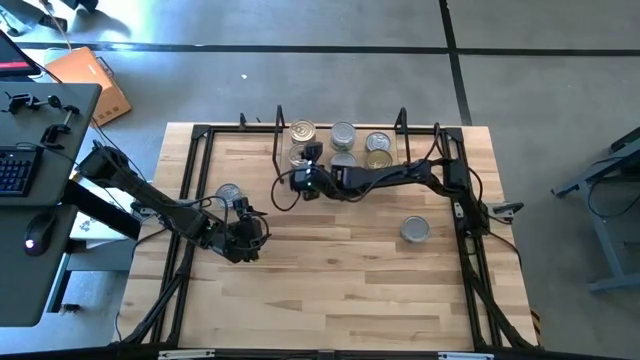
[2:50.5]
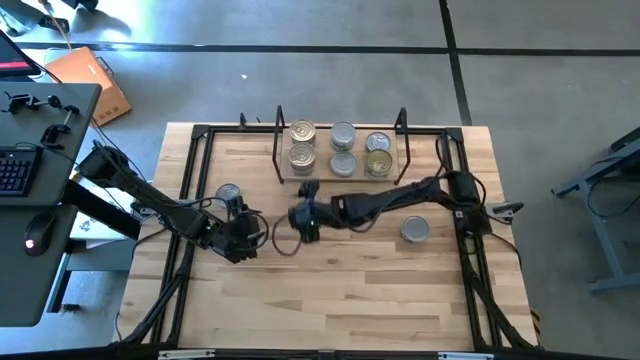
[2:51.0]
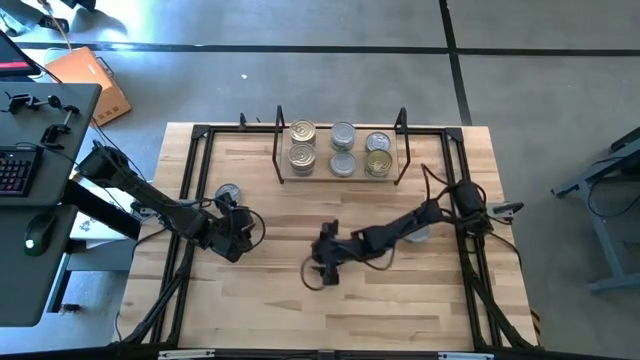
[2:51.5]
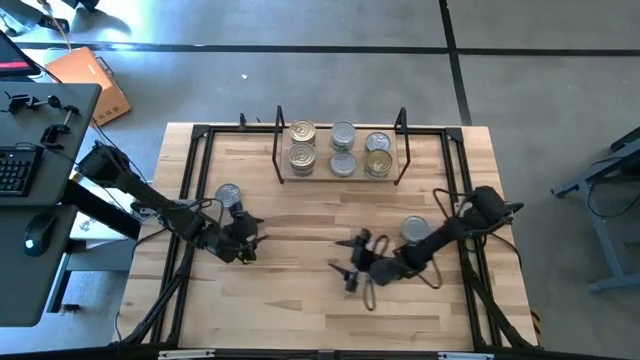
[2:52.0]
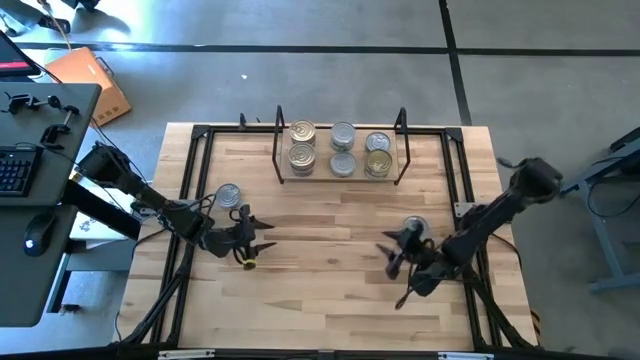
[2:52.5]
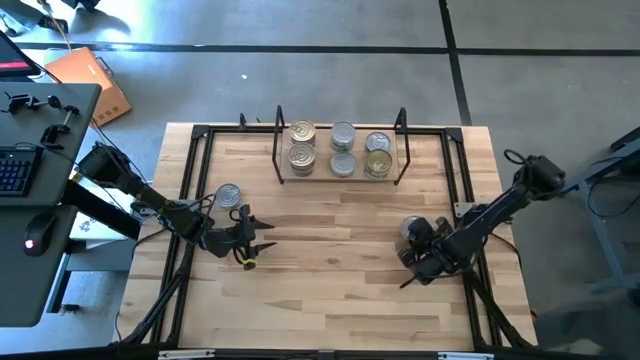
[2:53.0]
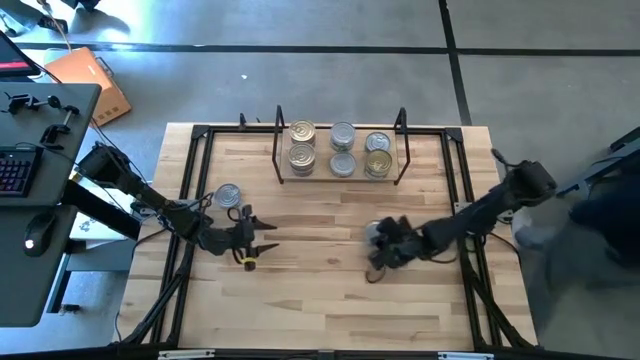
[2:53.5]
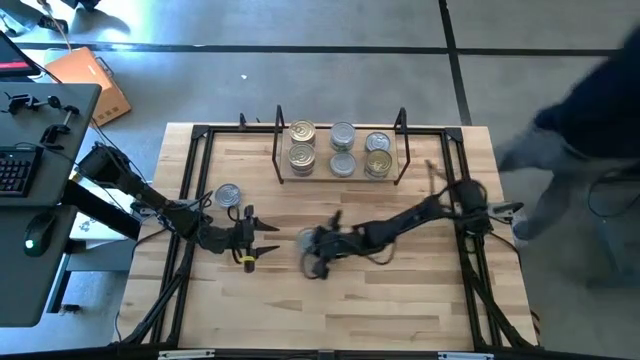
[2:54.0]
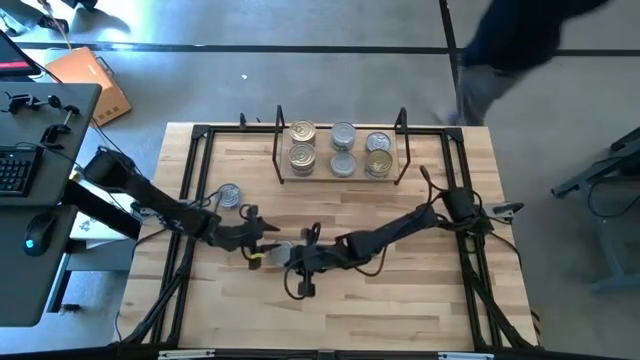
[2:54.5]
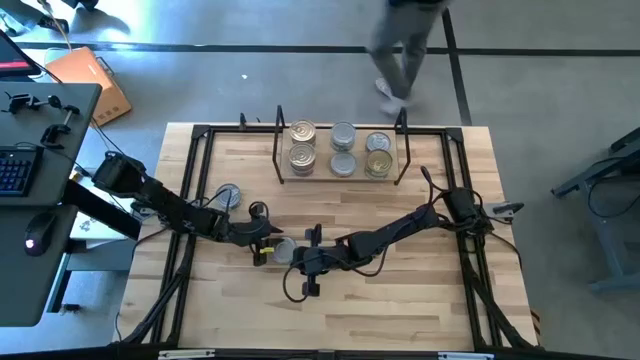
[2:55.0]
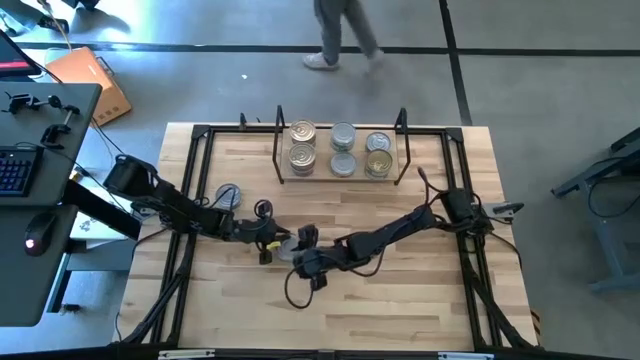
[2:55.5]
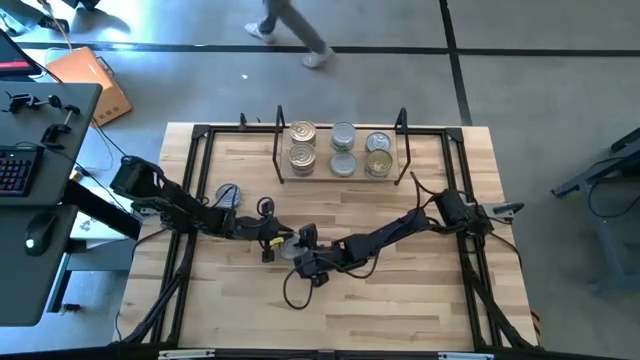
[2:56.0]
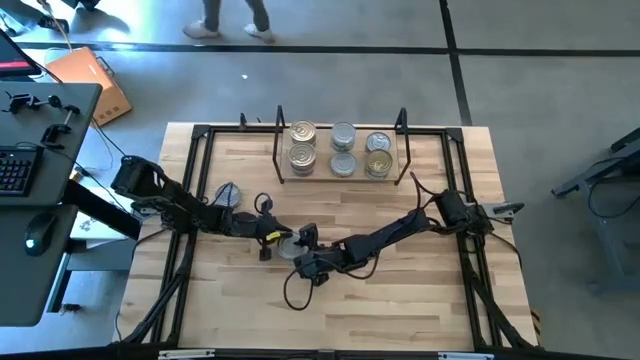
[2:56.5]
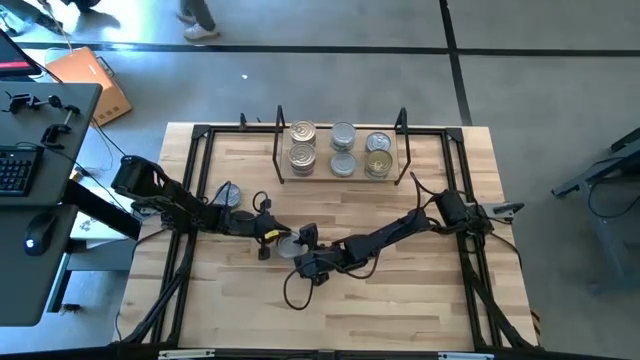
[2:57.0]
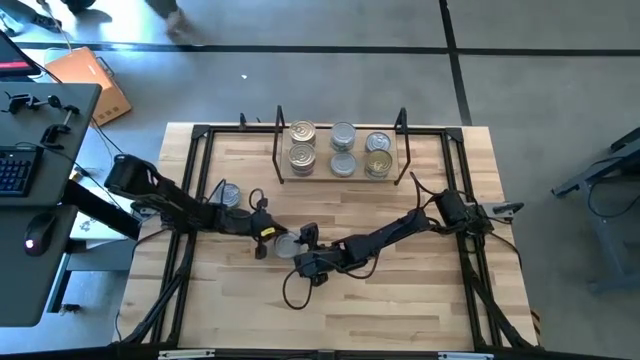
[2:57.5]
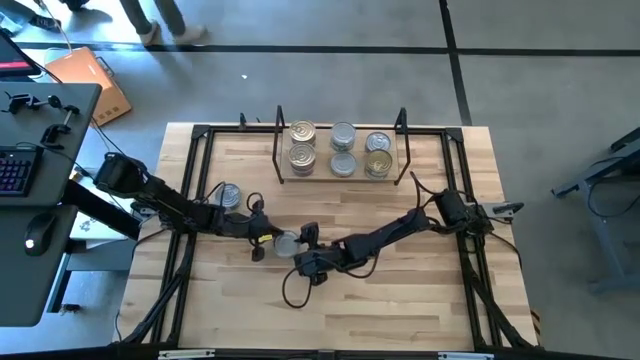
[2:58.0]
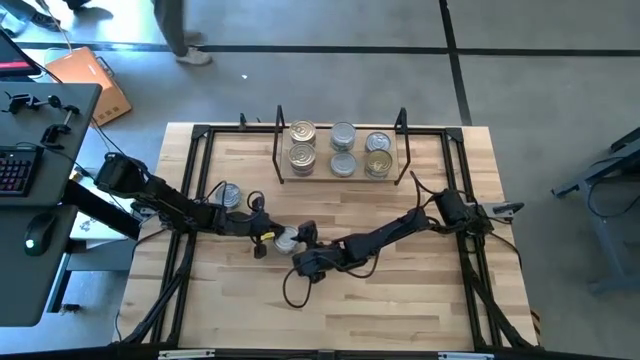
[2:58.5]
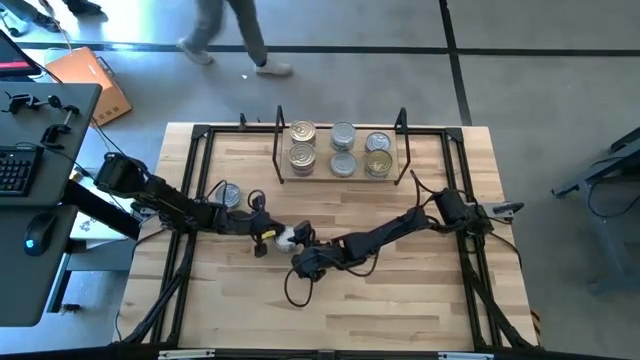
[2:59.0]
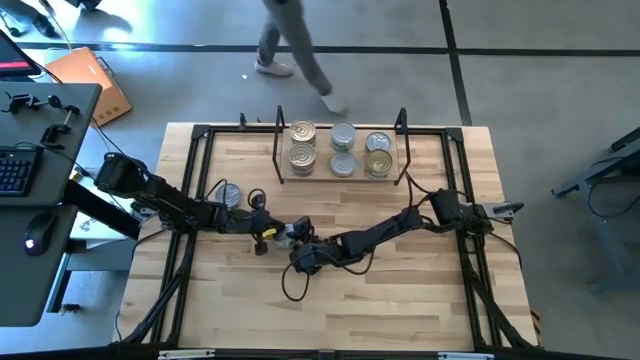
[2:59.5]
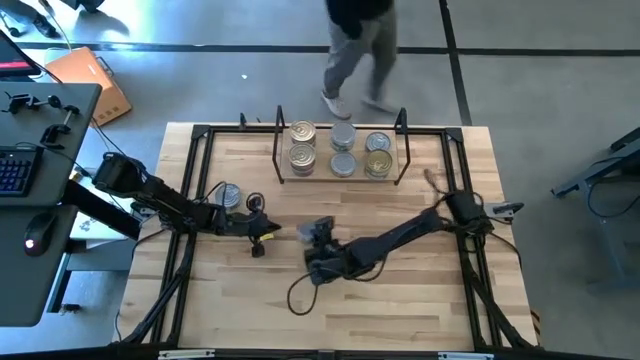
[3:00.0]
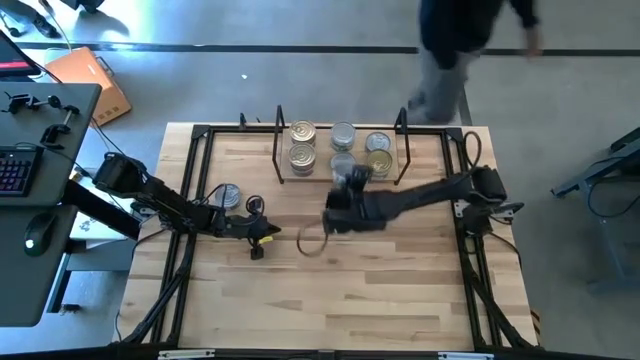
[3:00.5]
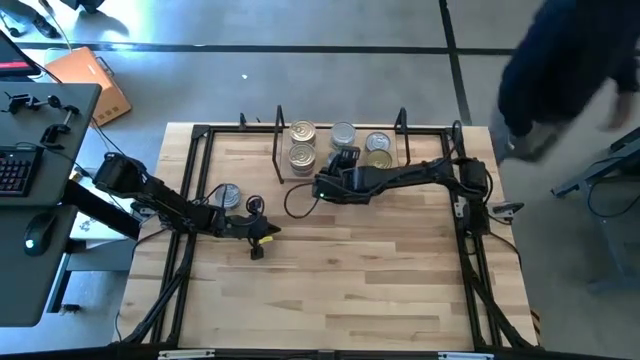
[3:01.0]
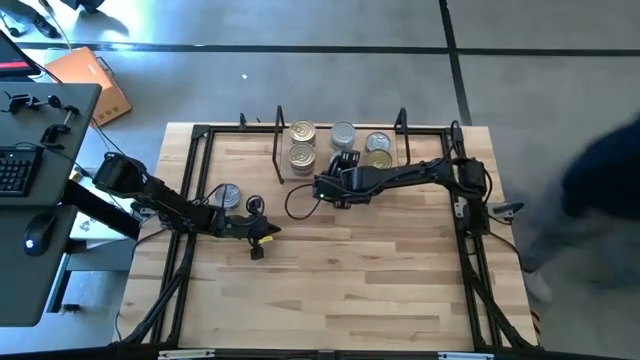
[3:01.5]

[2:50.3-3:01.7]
Task: Stack canned seafood by type on shelf
Stack the green tuna can on top of the green tuna can on the shelf

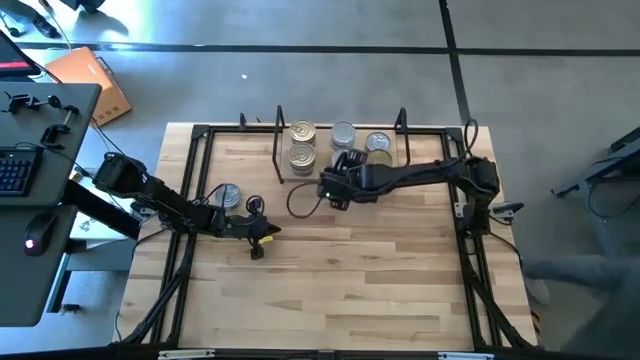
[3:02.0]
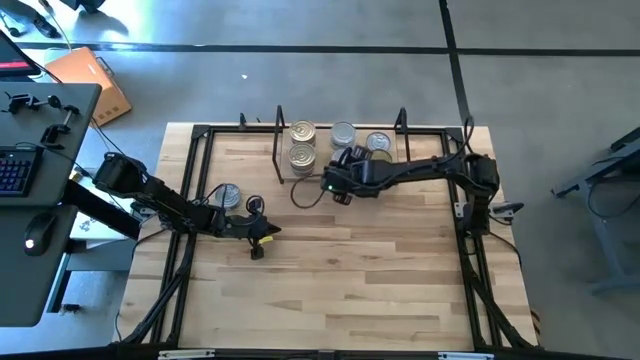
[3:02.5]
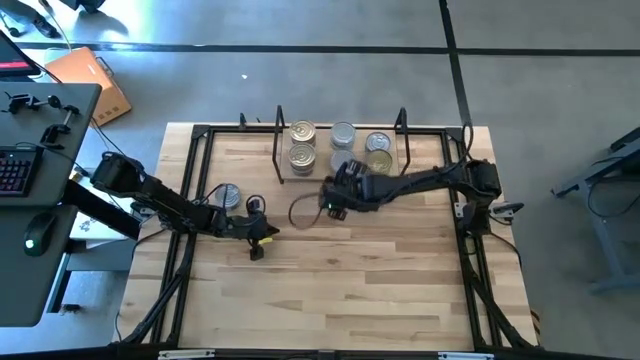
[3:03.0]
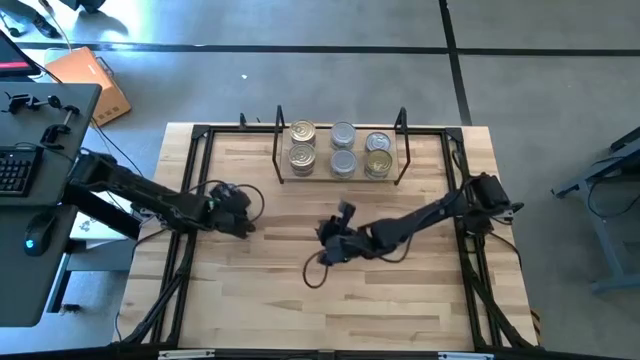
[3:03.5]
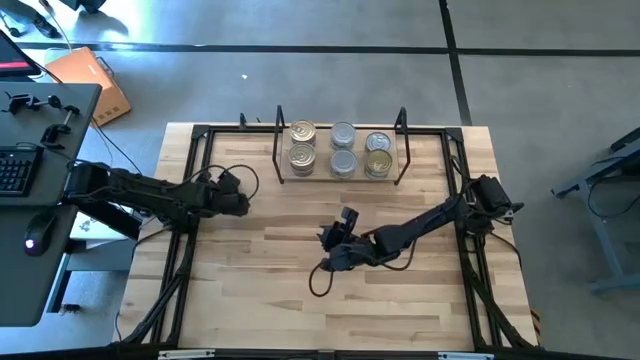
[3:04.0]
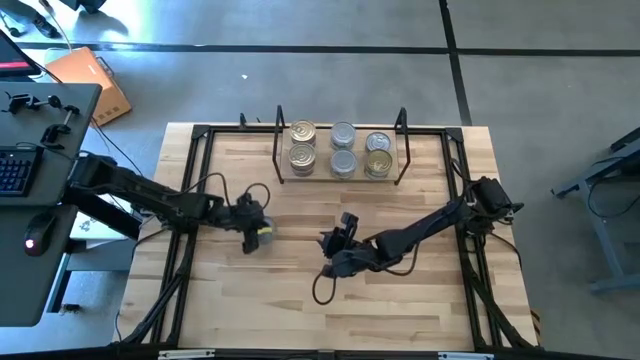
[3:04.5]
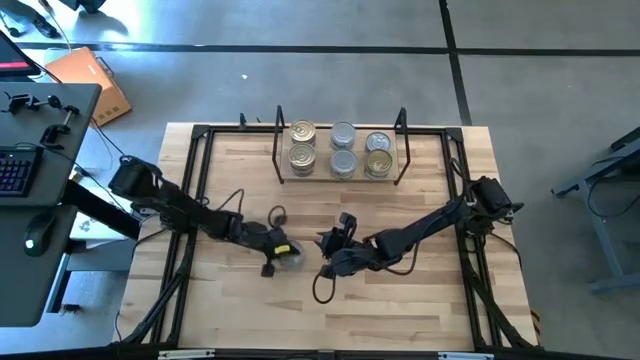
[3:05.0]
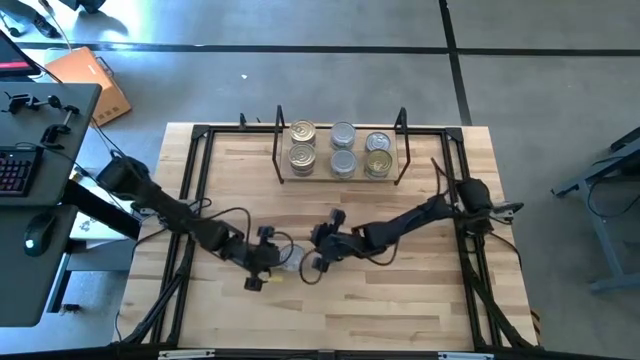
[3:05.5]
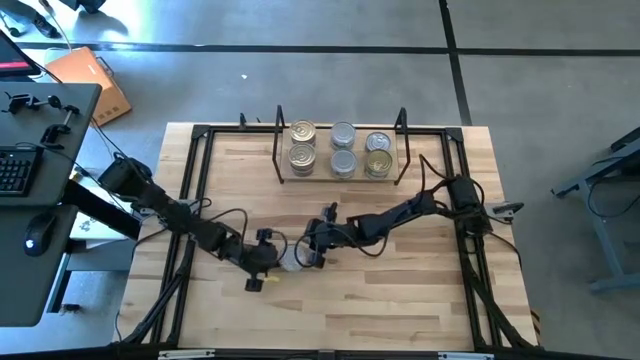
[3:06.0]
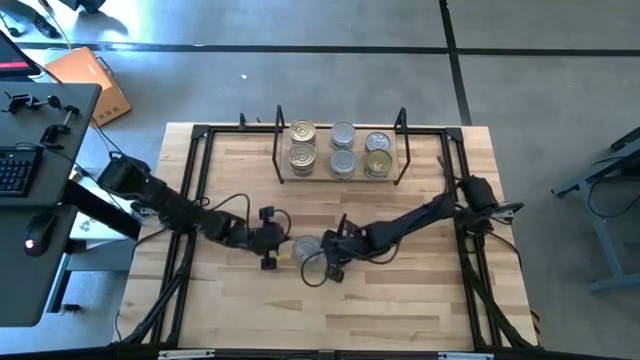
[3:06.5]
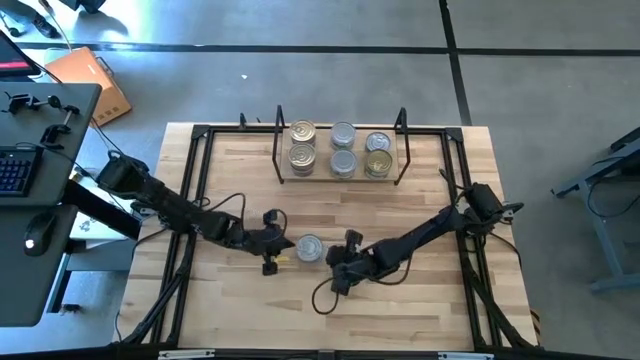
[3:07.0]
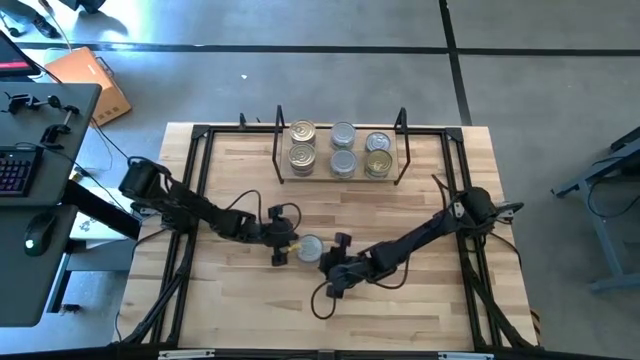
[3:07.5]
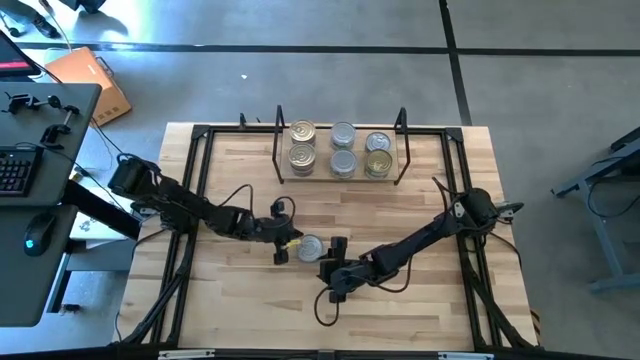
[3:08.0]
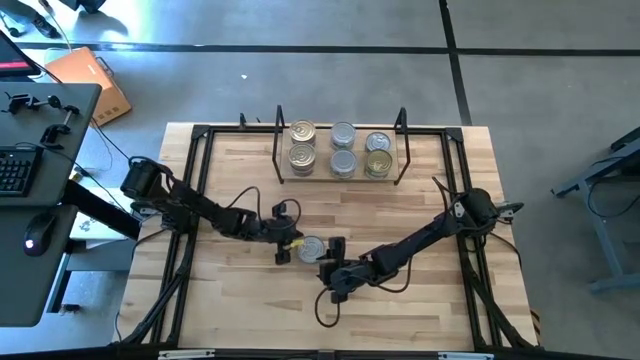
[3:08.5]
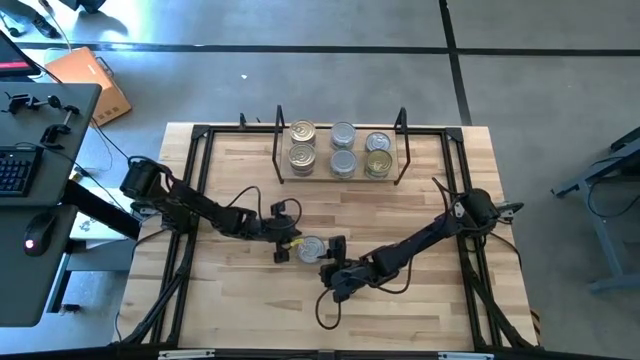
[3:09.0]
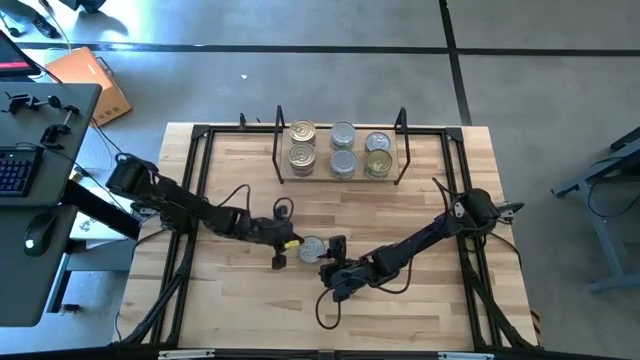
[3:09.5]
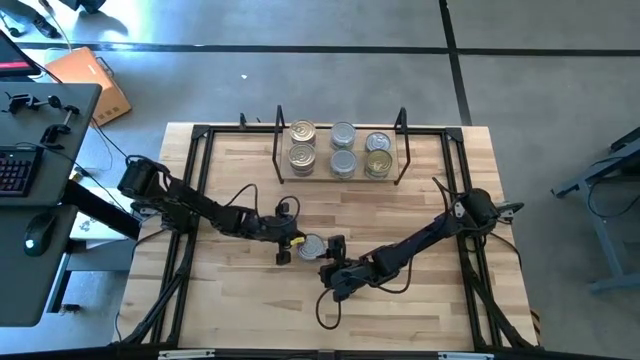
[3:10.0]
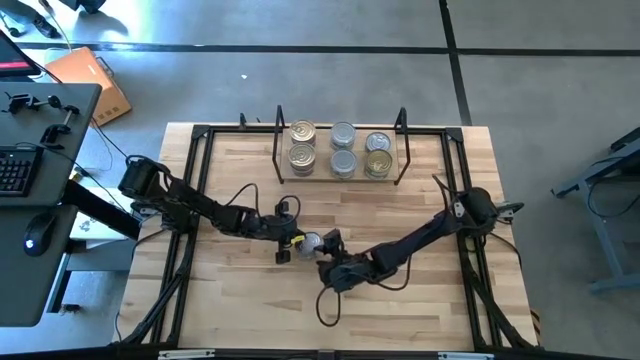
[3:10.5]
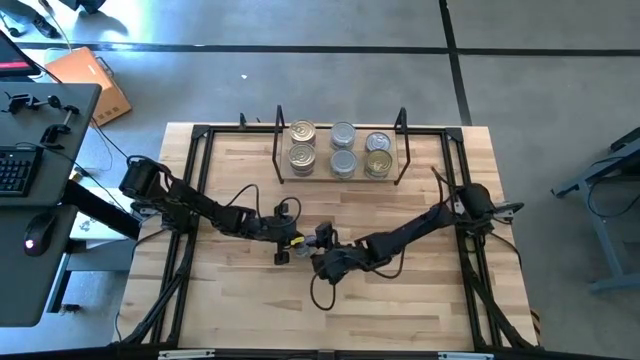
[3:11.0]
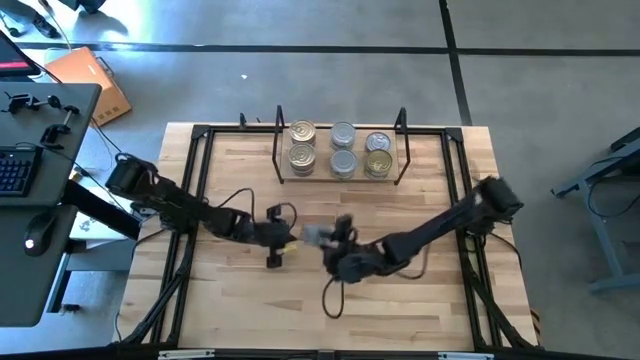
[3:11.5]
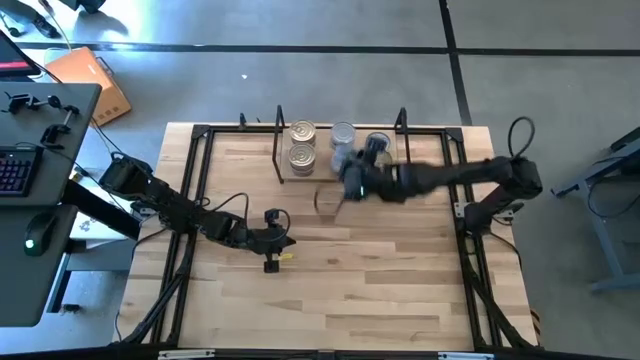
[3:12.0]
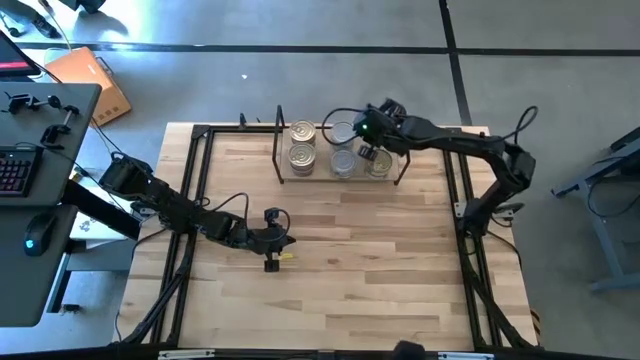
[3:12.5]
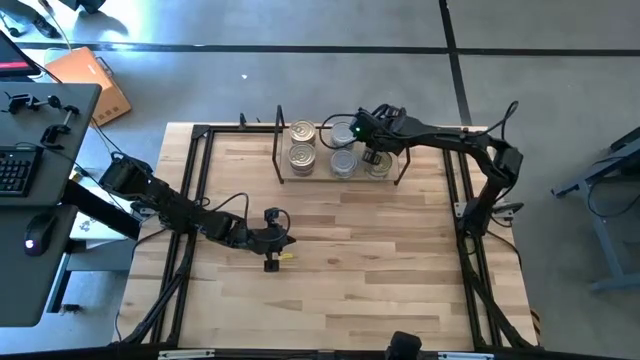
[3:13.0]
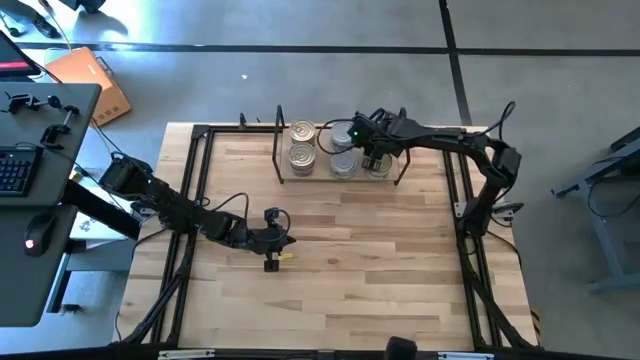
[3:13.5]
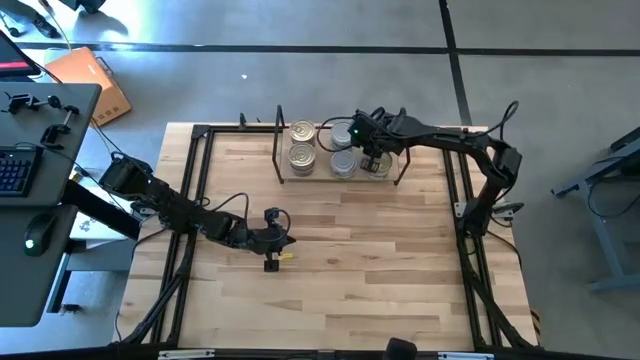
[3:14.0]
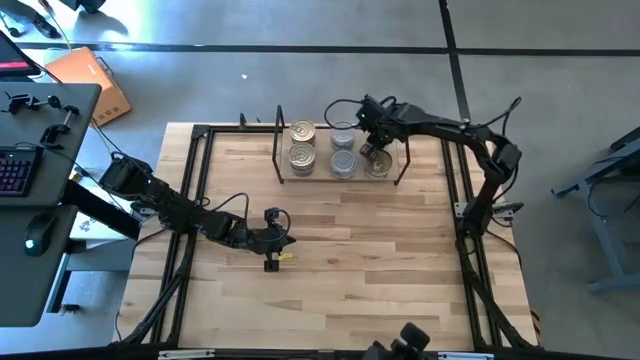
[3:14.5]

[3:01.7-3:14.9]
Stack the green tuna can on top of the green tuna can on the shelf
